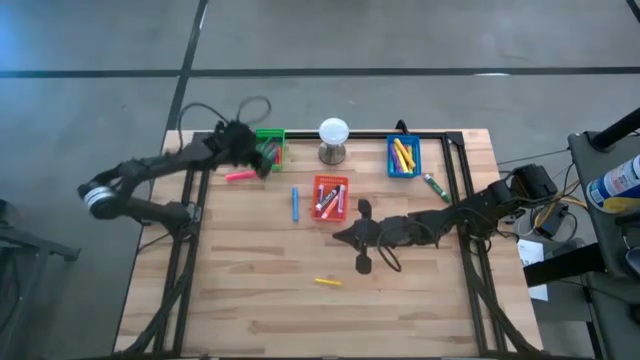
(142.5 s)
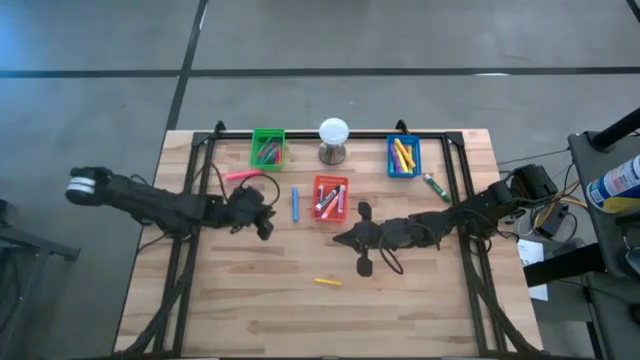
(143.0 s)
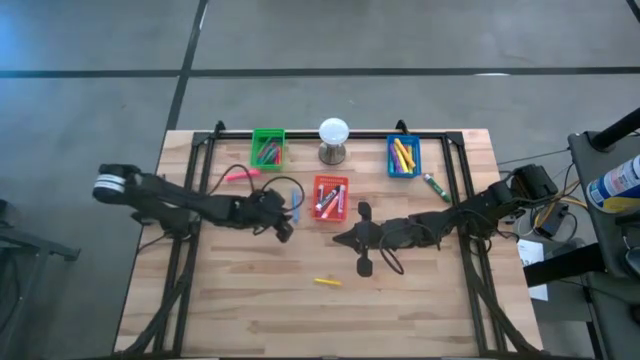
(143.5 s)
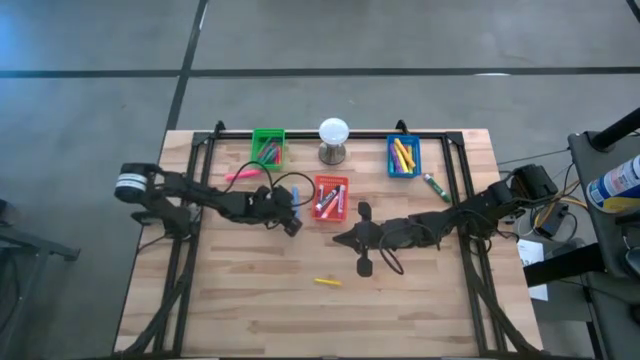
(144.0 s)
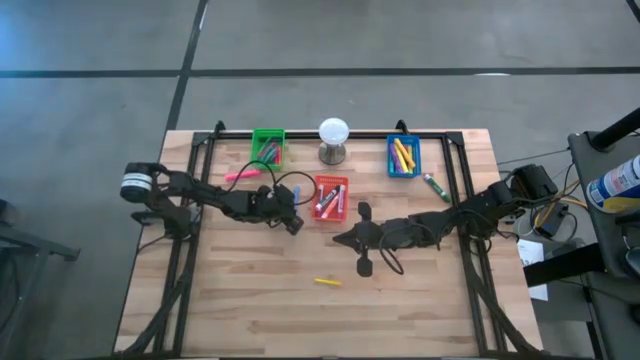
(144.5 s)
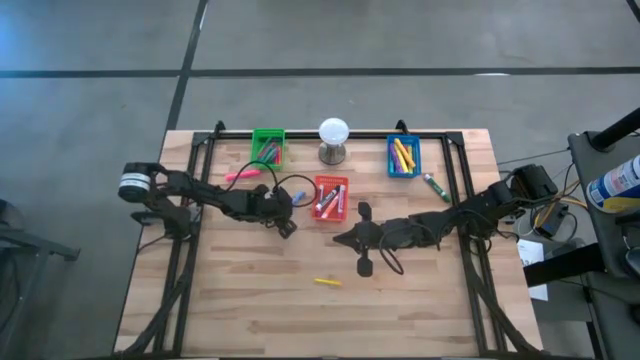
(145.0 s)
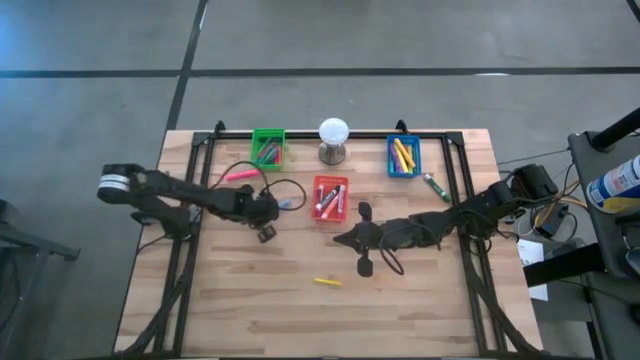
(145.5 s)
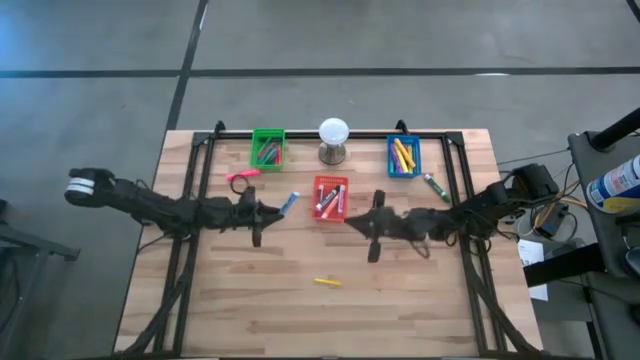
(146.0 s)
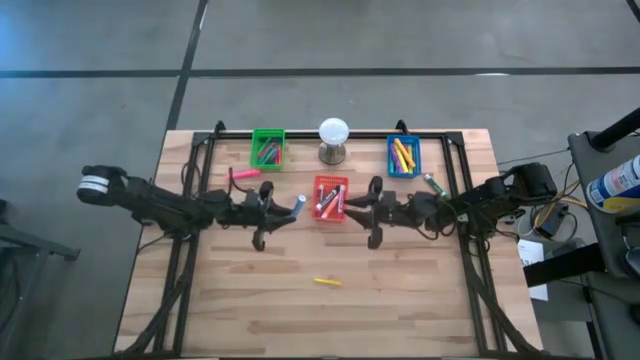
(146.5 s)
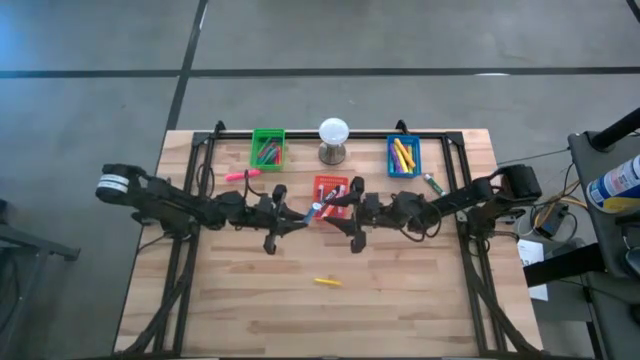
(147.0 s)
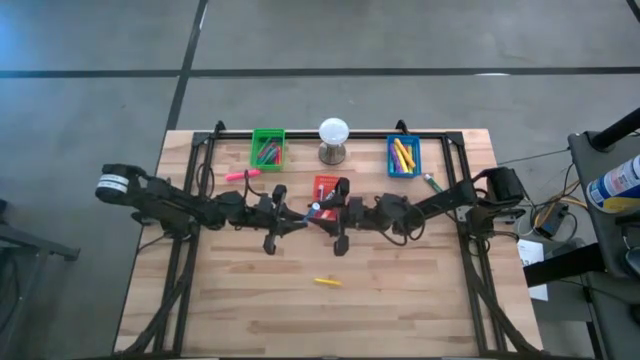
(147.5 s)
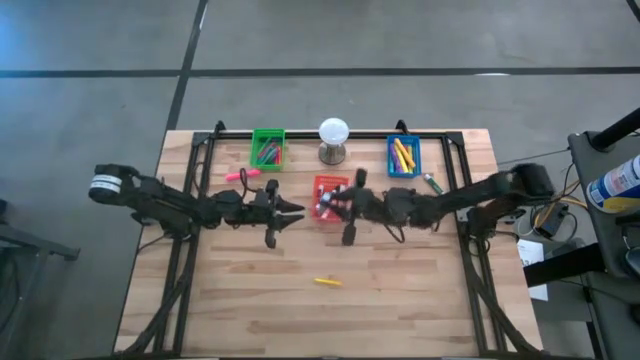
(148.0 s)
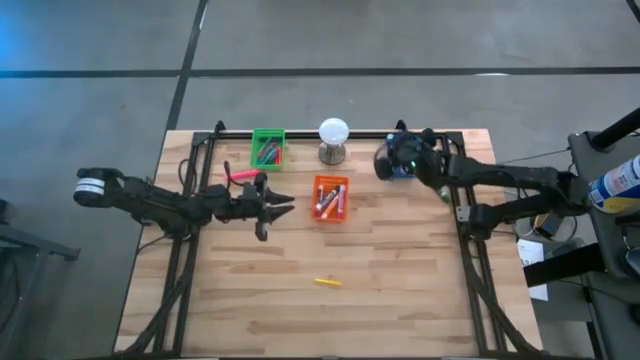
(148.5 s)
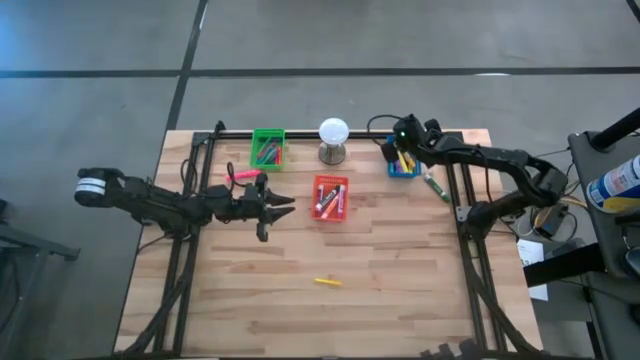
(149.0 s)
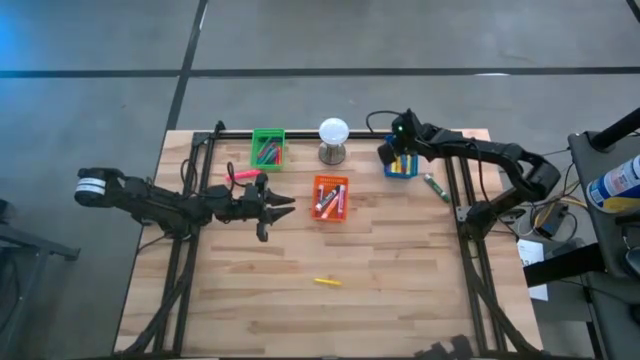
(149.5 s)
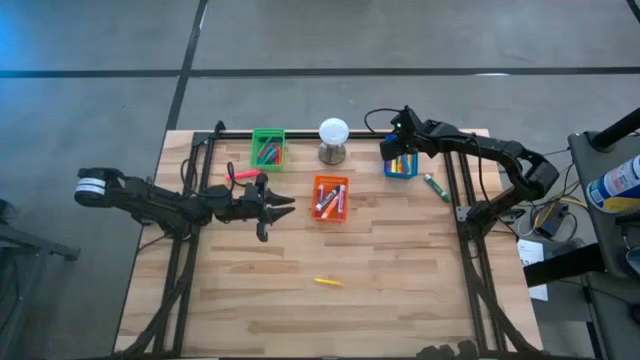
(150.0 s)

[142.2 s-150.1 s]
Task: Pick & Place Markers
Put the blue highlighter into the blue bin

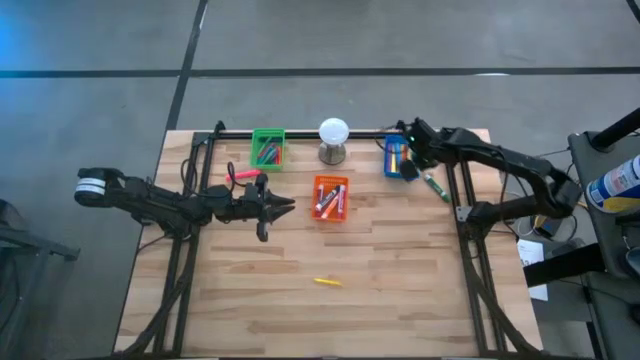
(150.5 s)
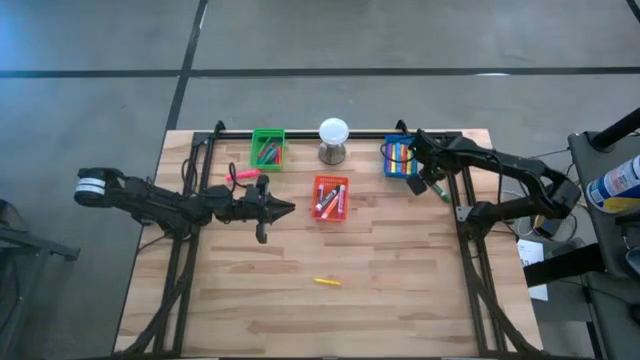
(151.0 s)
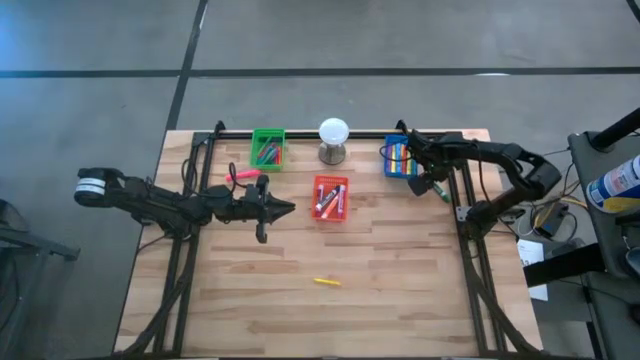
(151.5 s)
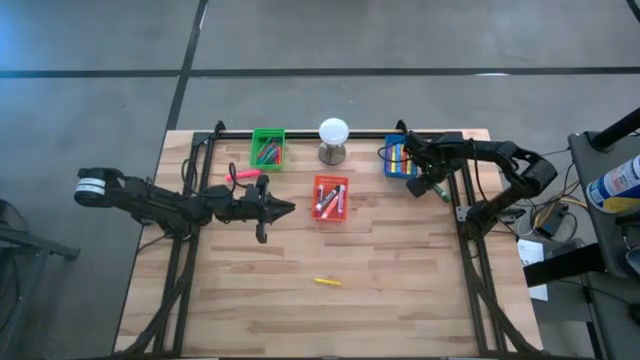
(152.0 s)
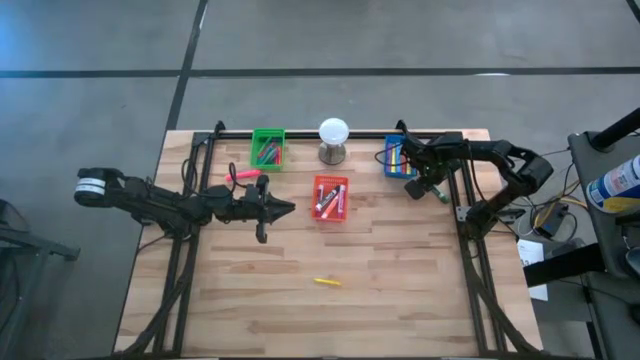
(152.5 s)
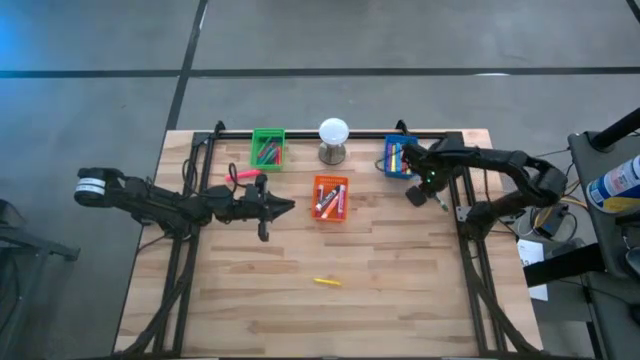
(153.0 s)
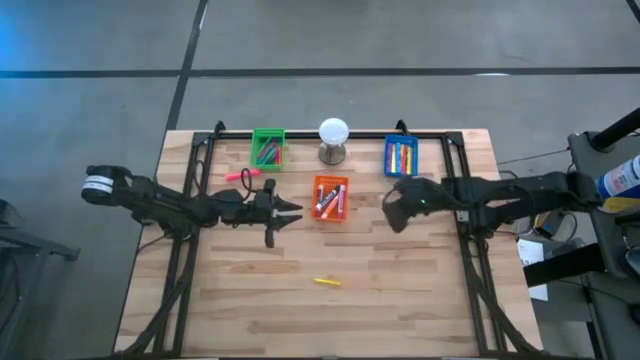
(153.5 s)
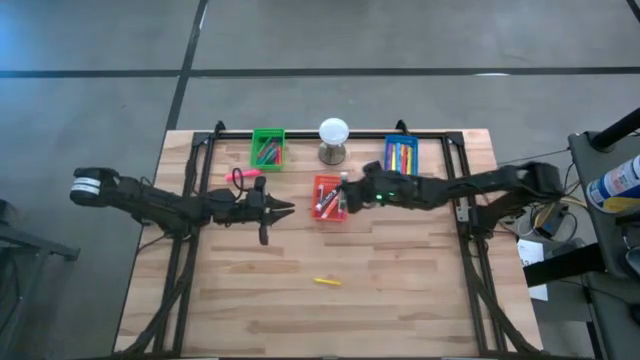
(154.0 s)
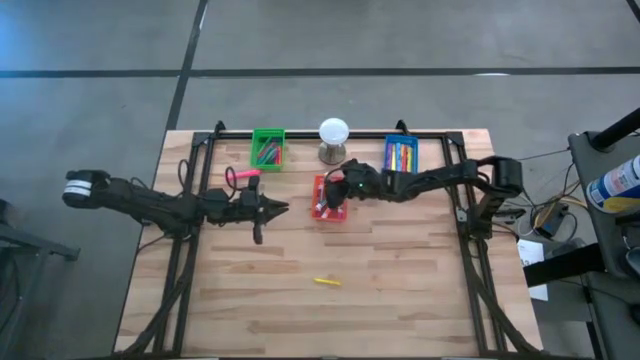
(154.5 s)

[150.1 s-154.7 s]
Put the green marker into the orange bin

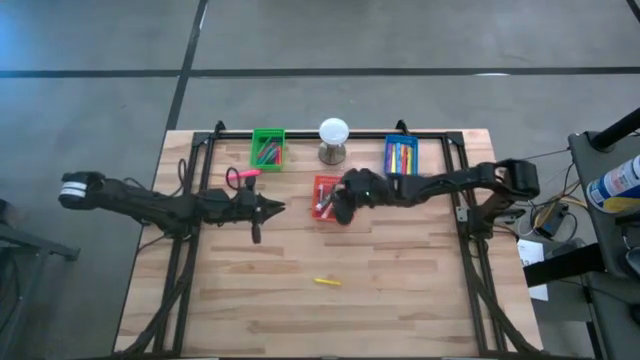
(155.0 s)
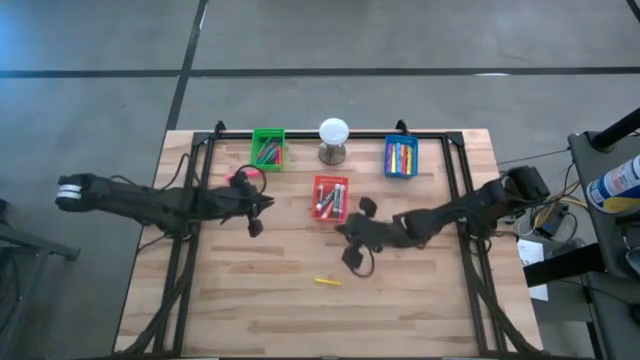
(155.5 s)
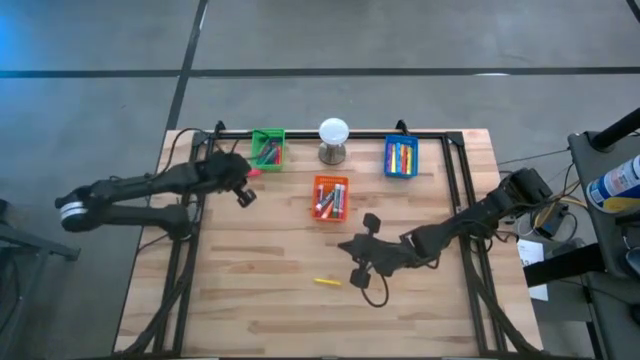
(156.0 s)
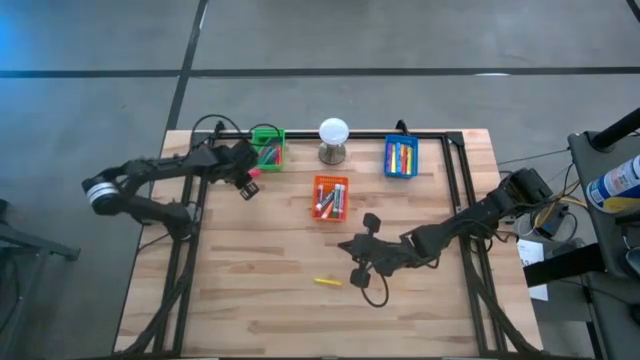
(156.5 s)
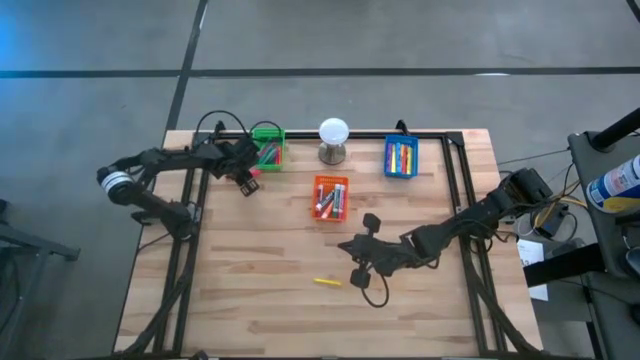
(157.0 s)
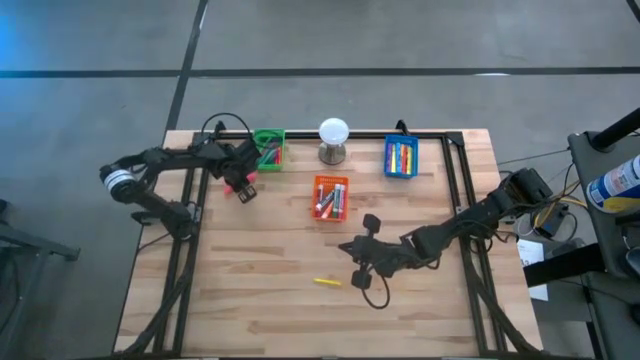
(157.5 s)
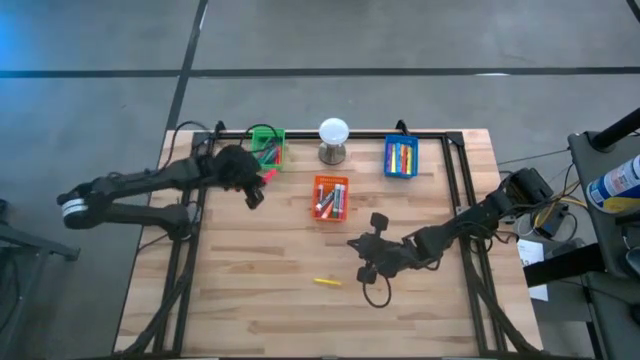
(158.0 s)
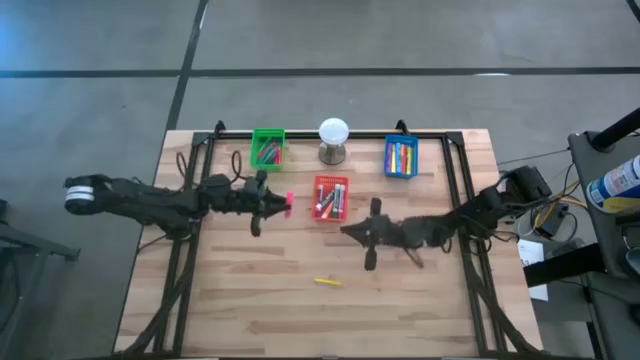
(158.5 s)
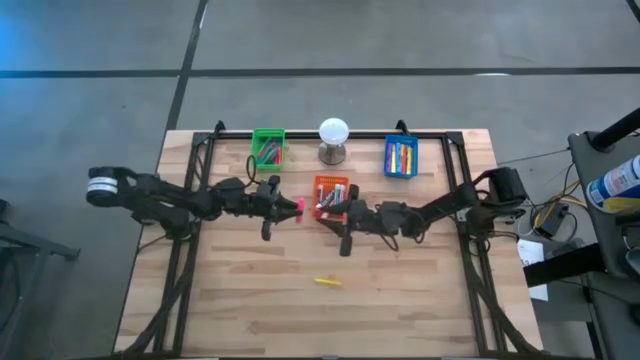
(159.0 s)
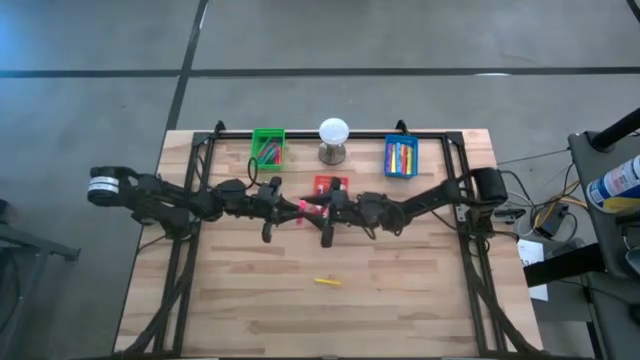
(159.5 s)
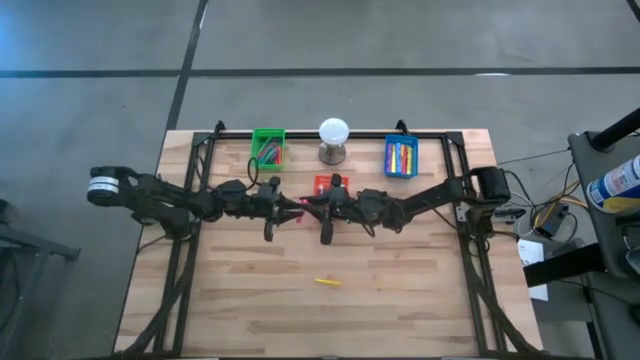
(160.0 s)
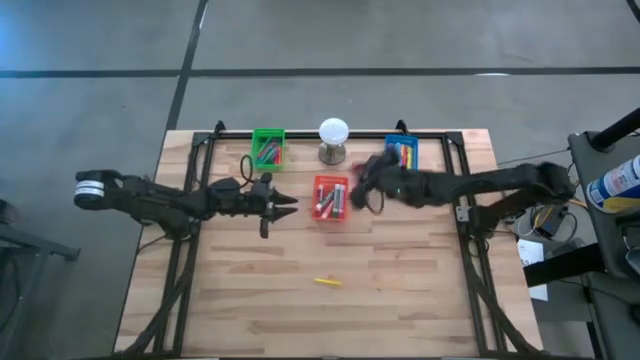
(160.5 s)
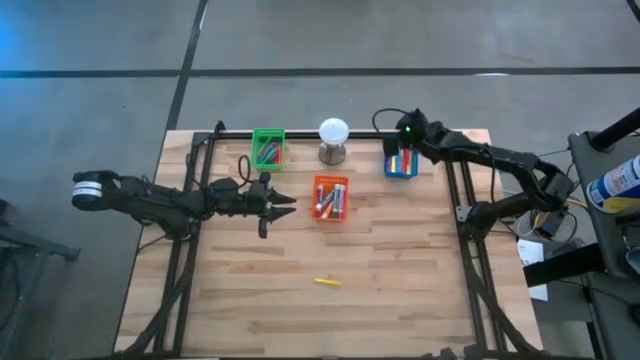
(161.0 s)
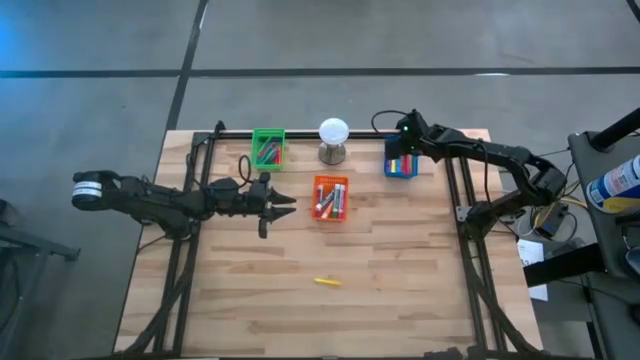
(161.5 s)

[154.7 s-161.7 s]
Put the pink highlighter into the blue bin

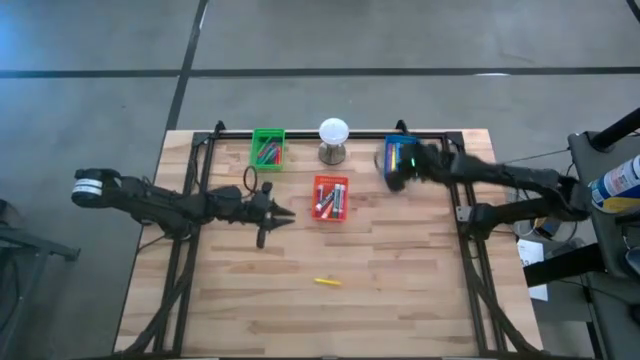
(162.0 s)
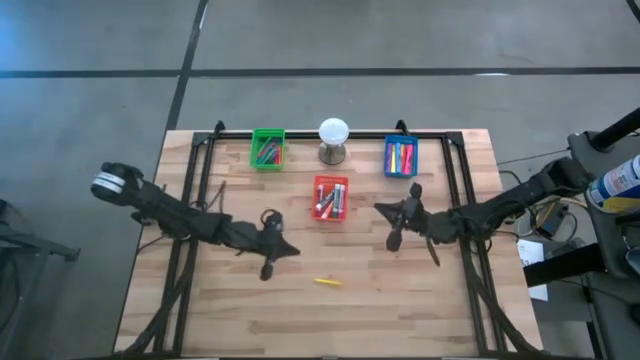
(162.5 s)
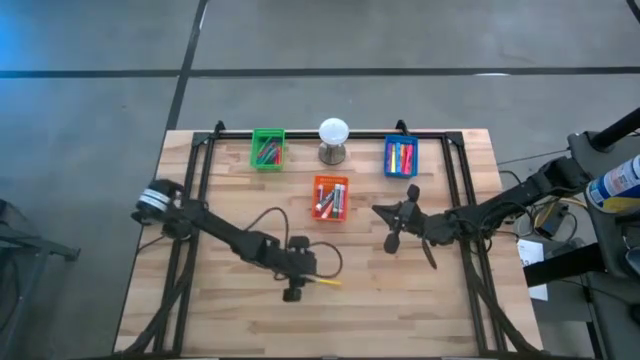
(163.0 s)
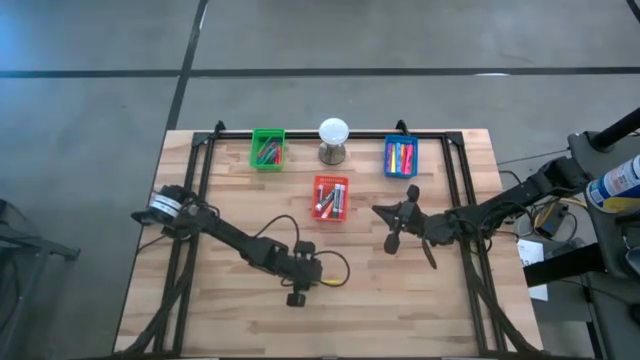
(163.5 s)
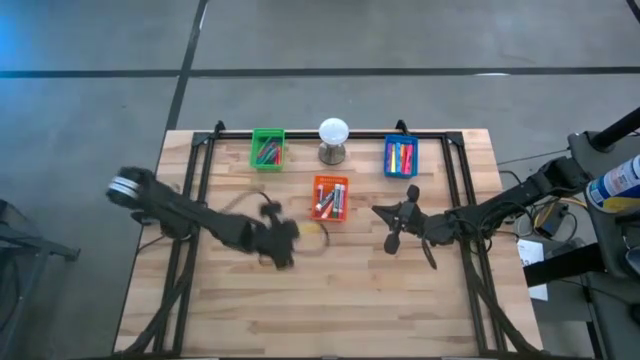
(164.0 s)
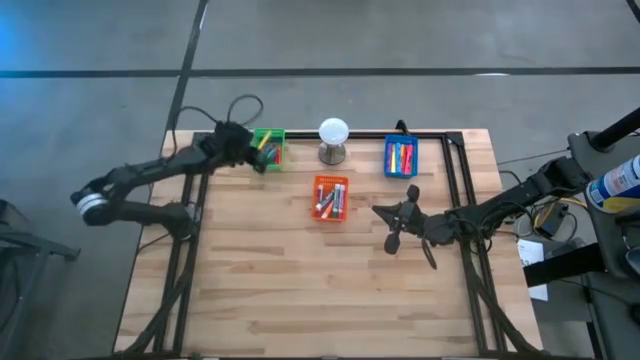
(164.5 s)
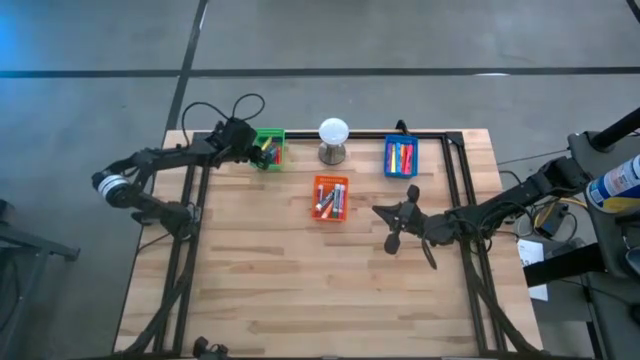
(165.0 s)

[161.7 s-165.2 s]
Put the yellow pen into the green bin
